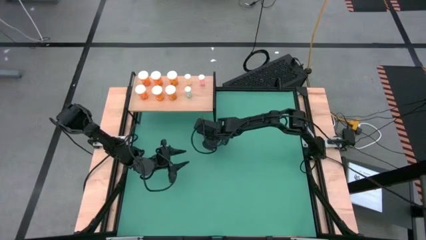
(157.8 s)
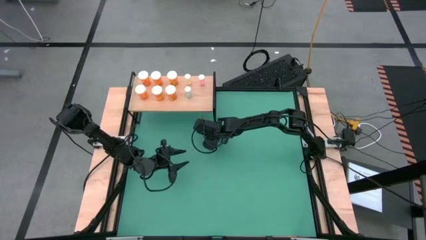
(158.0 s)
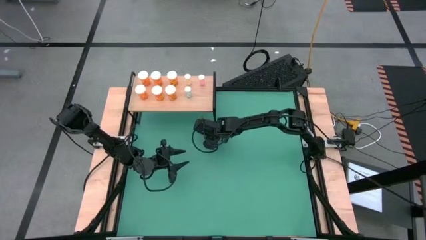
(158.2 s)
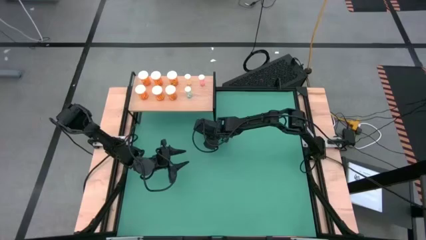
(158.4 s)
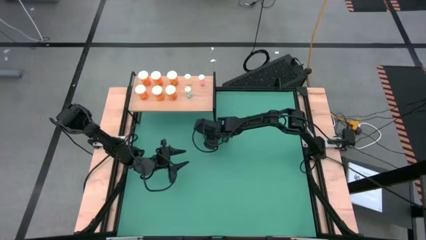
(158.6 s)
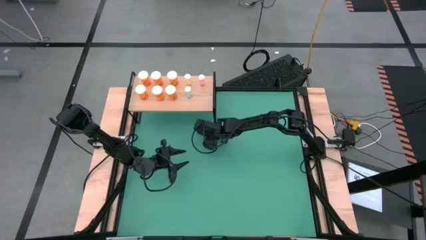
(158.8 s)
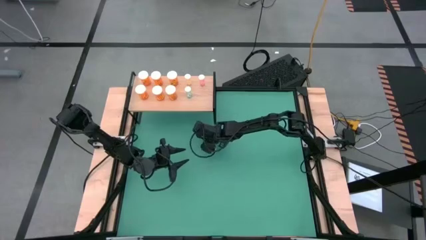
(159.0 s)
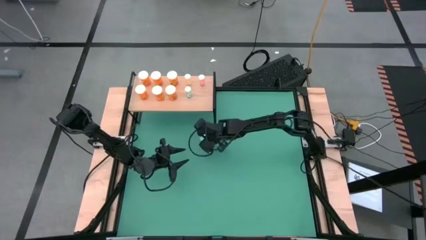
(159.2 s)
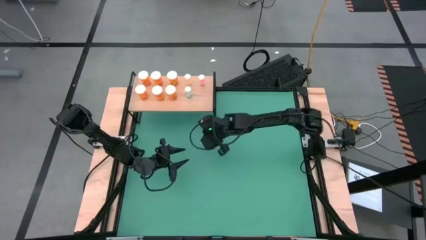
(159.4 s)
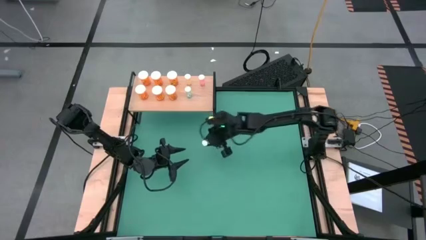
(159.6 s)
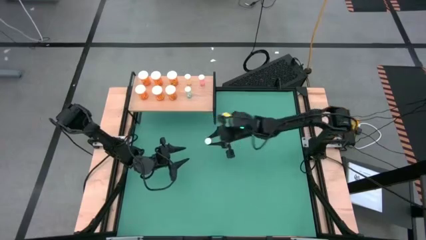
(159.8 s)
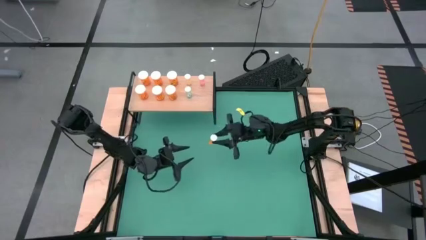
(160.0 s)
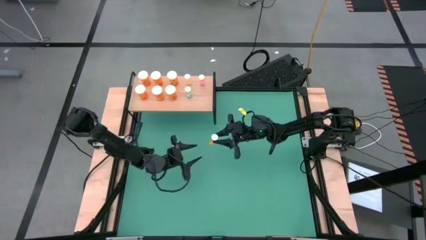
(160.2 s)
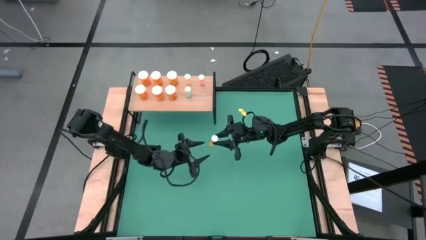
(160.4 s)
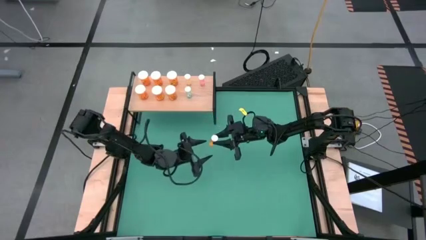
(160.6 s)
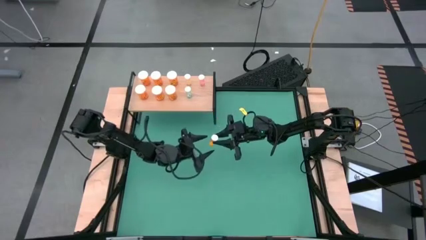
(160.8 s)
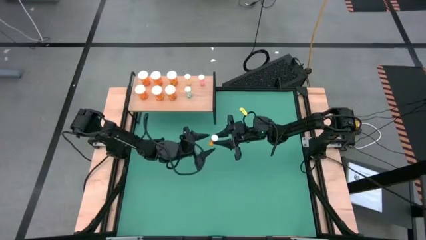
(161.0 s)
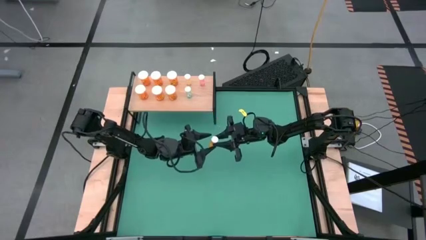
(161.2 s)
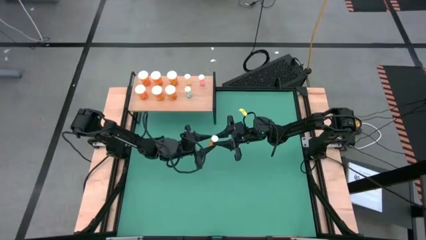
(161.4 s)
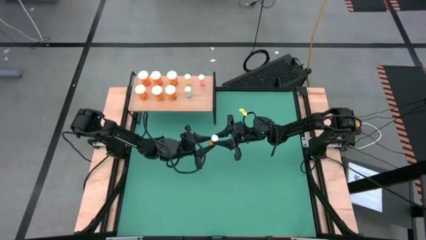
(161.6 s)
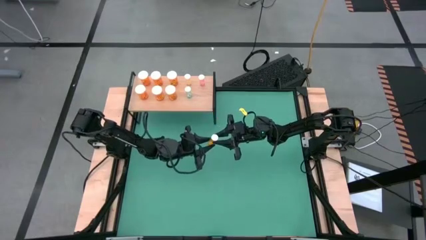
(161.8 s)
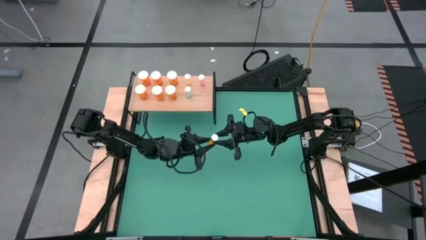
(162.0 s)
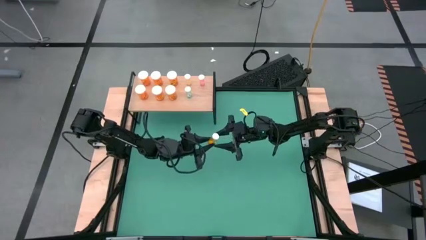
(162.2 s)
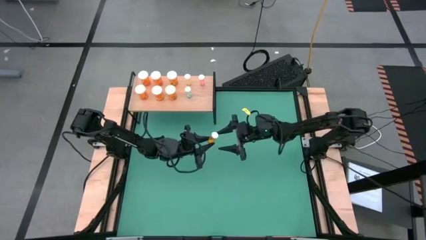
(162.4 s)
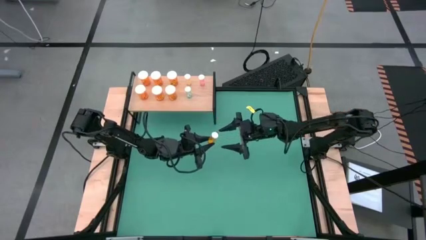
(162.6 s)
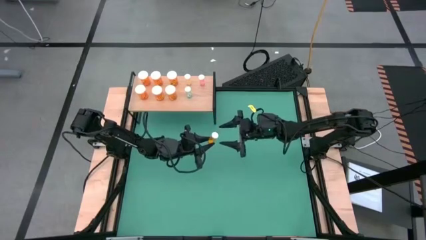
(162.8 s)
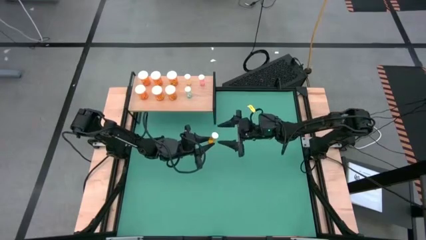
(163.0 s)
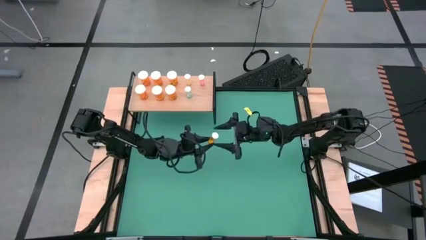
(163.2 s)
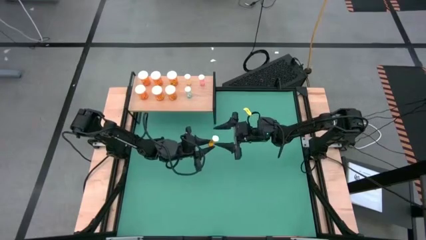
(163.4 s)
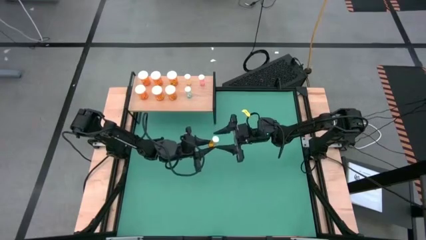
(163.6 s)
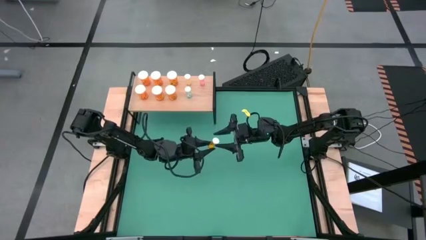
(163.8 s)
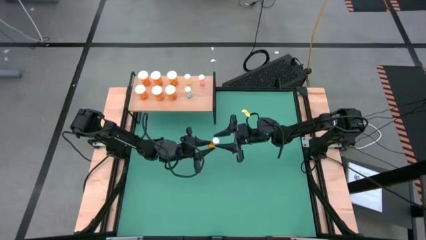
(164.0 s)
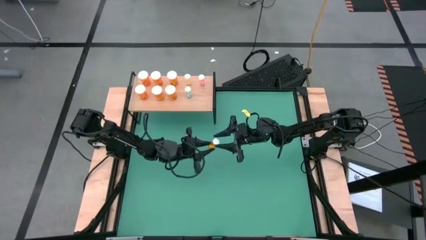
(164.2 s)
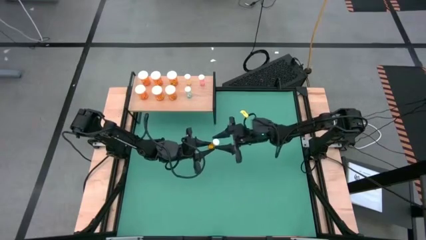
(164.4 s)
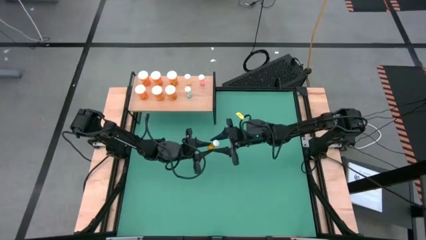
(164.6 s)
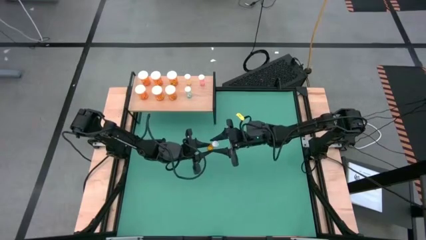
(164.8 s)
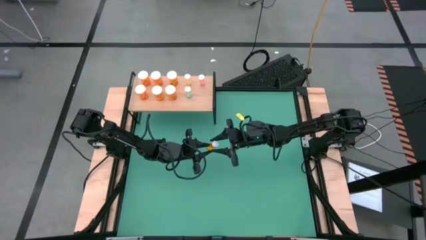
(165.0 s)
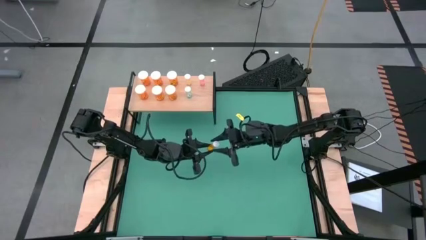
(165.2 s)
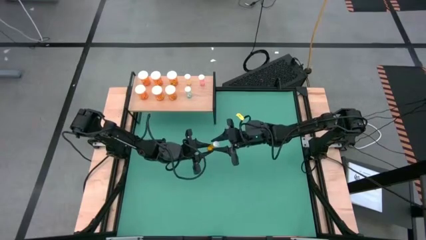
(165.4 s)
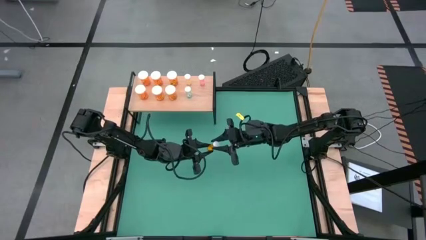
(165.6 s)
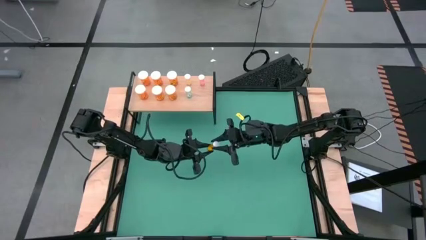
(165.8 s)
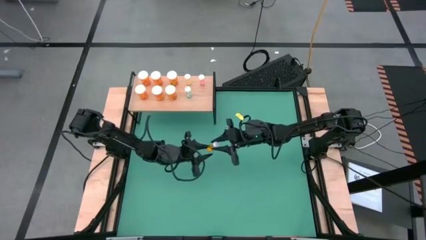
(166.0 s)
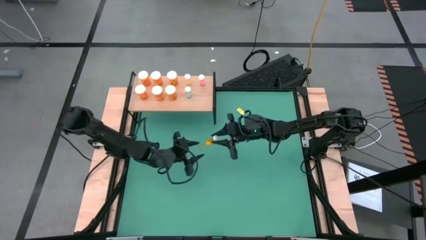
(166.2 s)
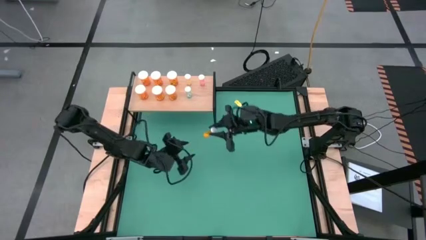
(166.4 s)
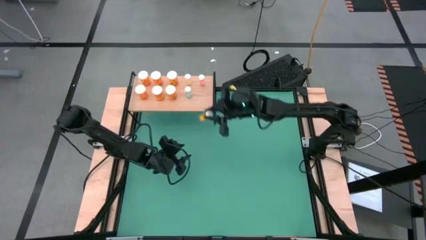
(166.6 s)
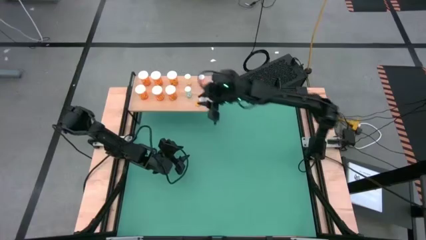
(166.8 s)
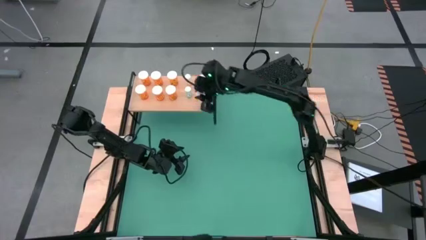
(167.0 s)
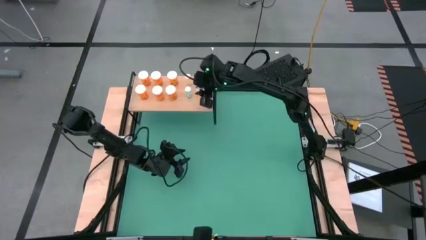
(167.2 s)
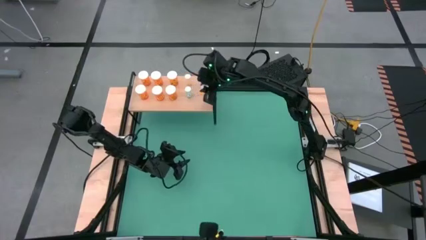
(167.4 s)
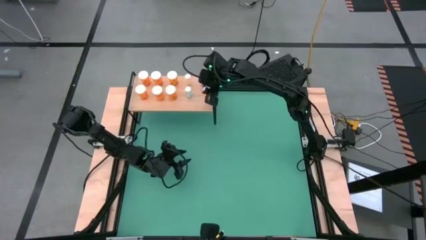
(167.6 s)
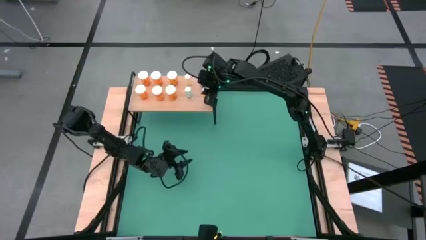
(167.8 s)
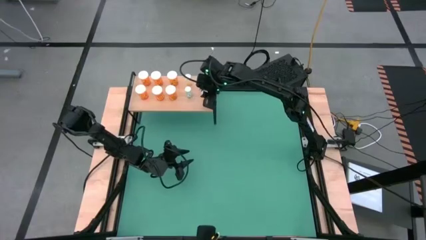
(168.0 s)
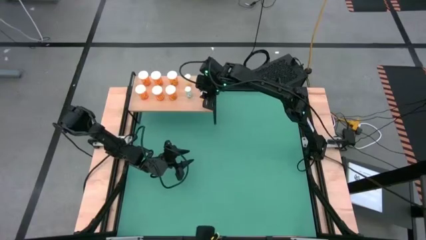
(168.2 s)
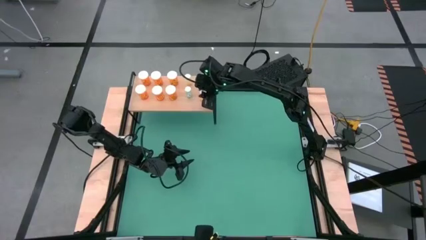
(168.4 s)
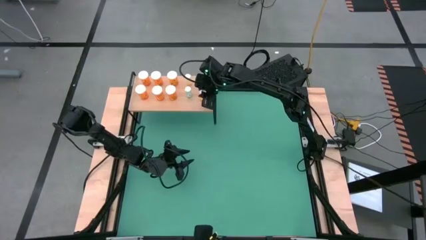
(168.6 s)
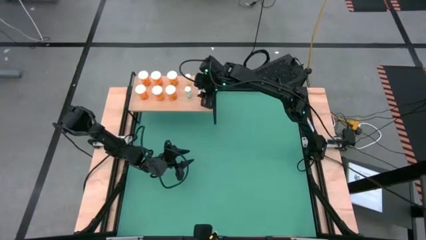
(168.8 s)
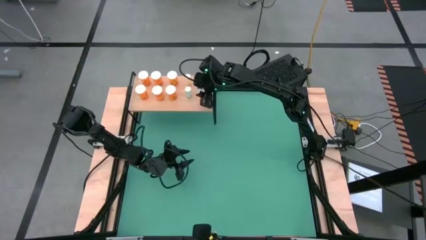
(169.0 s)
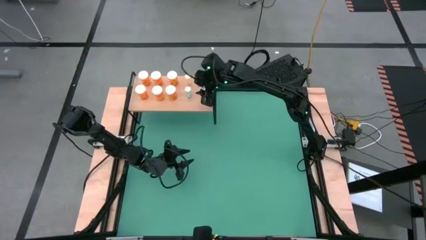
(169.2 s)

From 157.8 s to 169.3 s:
Task: Pick and place medicine bottles onto shelf by color
Put the small orange pill bottle on the shelf aligned with the other small orange pill bottle
